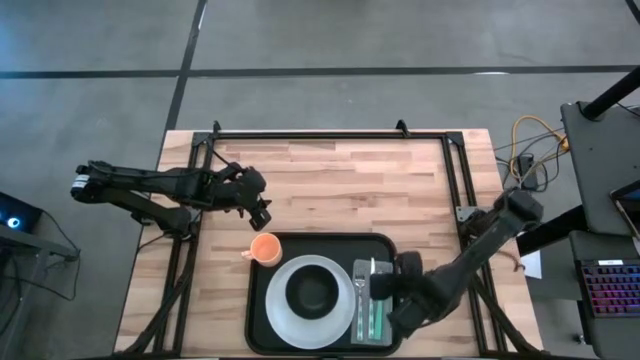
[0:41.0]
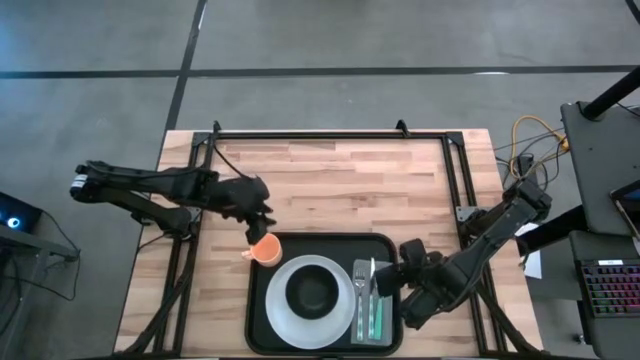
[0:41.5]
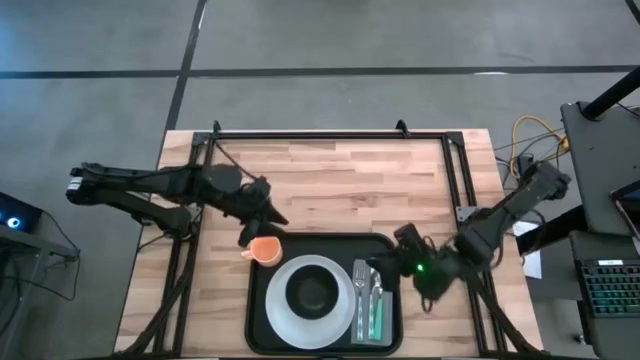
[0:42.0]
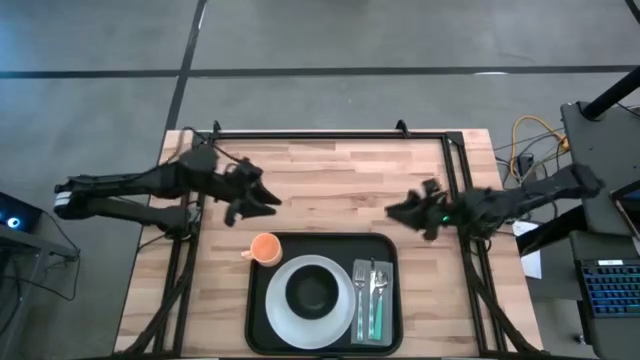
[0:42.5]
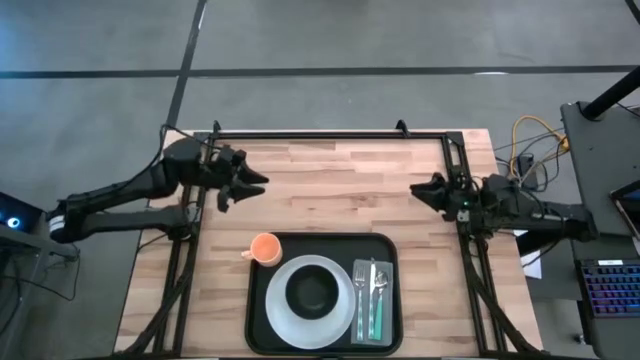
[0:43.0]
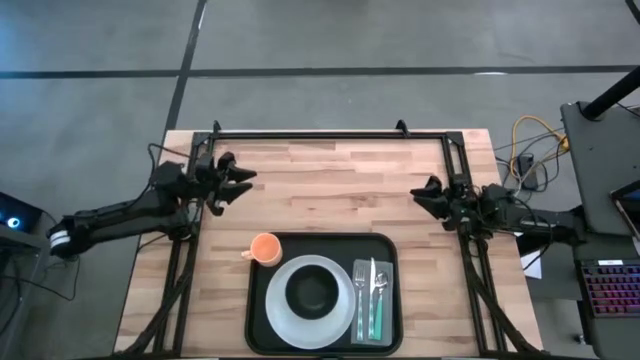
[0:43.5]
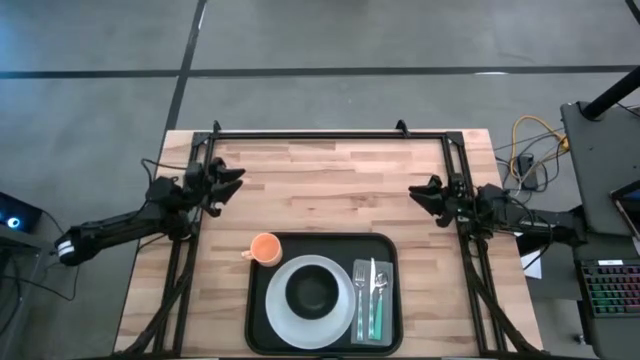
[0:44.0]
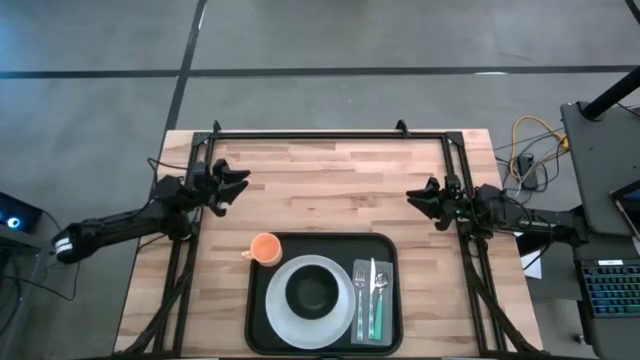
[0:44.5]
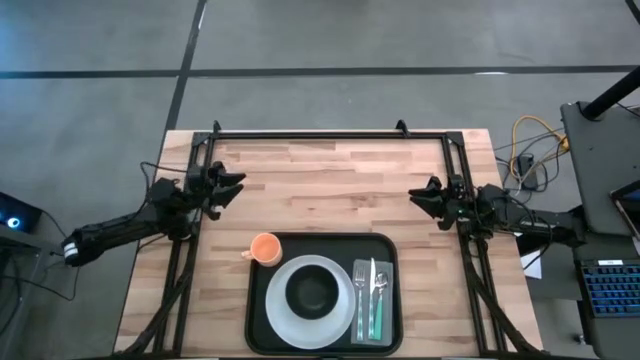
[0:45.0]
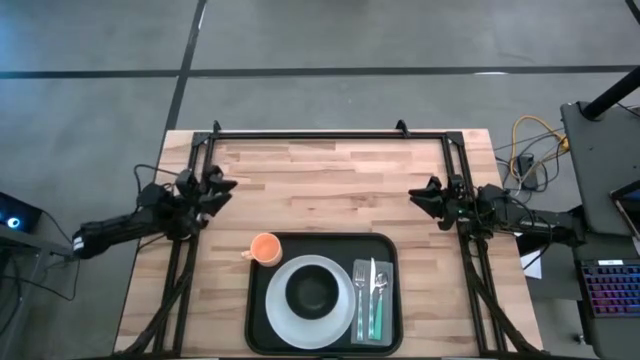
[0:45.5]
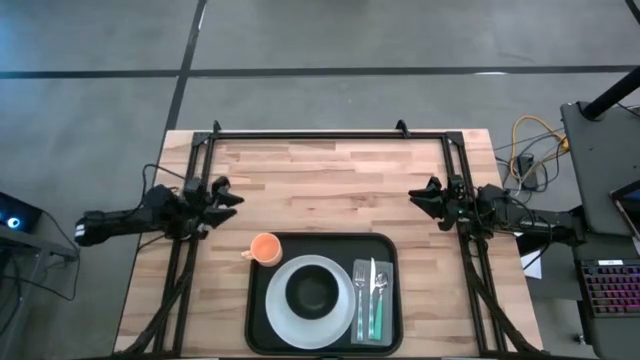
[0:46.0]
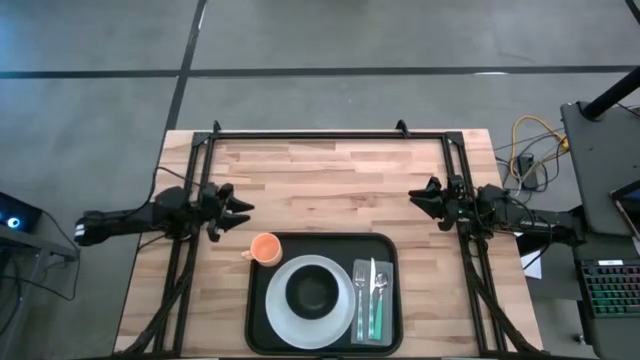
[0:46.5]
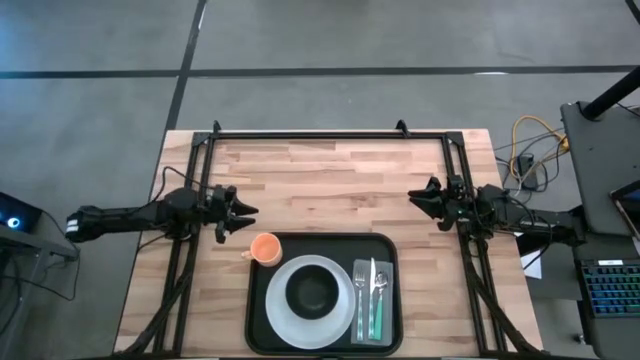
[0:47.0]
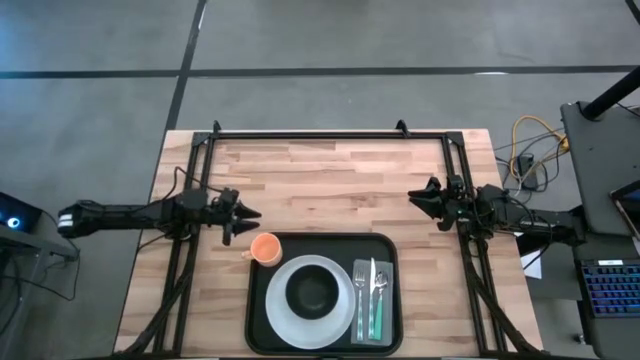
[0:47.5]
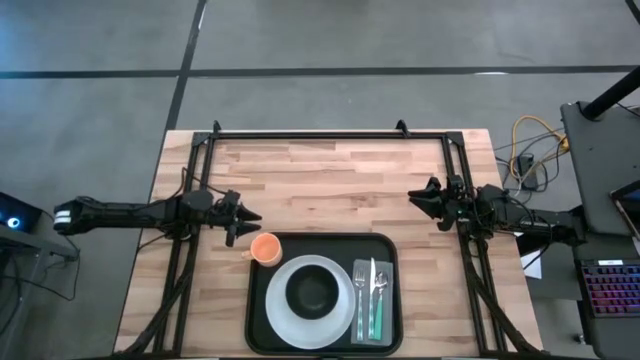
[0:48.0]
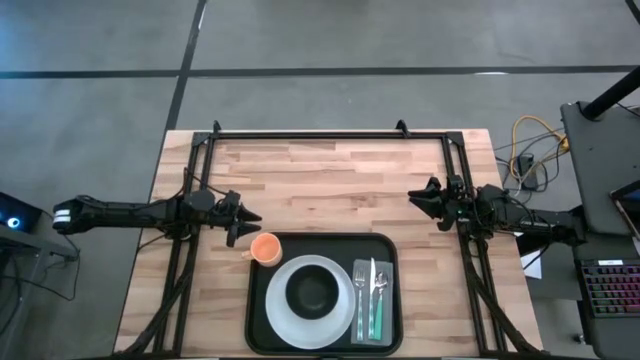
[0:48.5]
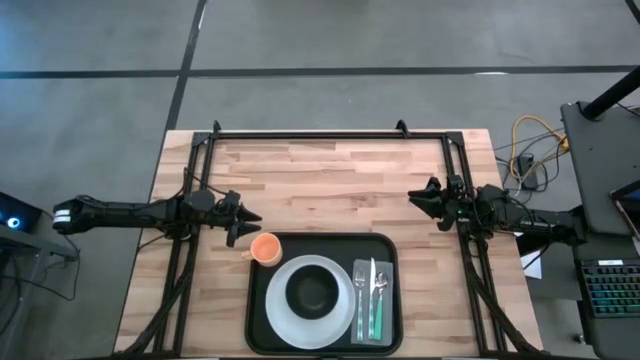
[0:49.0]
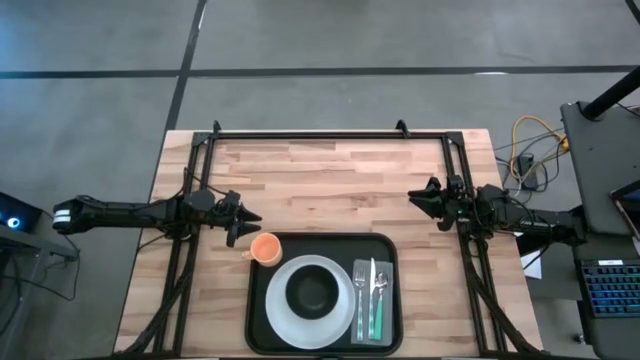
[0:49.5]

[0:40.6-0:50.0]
Task: Set up tray
Return to Home Position

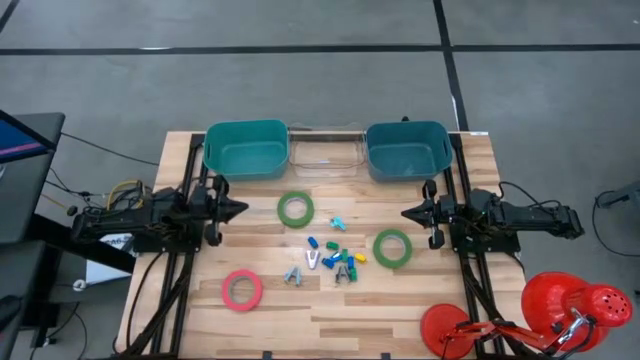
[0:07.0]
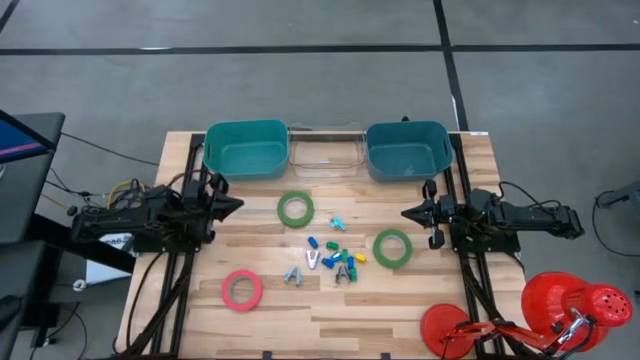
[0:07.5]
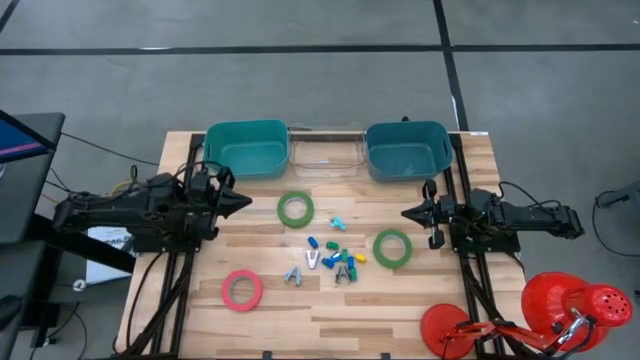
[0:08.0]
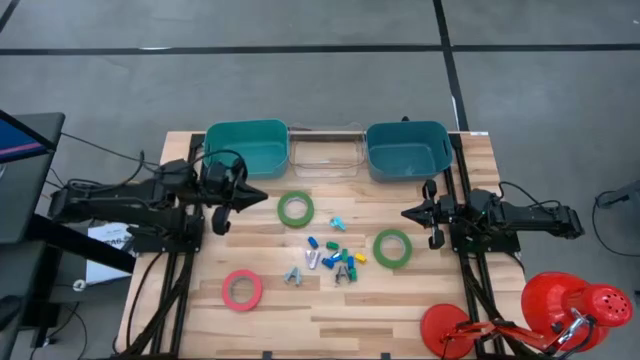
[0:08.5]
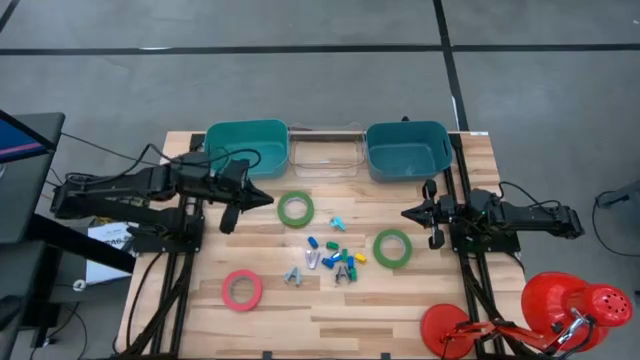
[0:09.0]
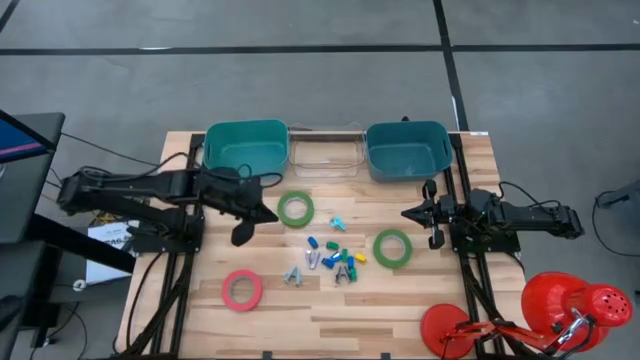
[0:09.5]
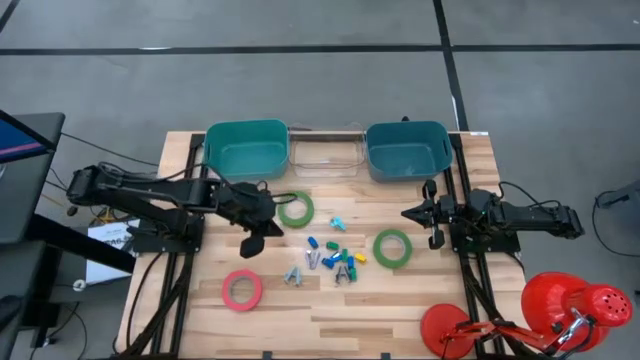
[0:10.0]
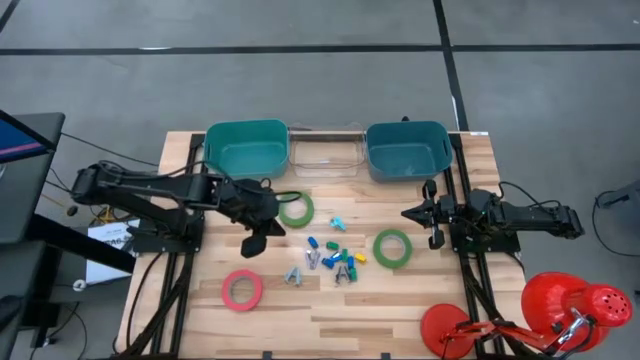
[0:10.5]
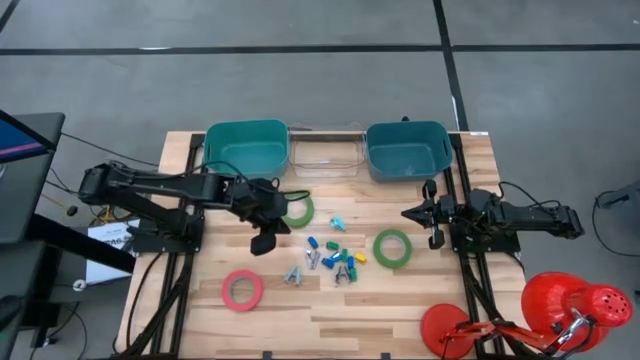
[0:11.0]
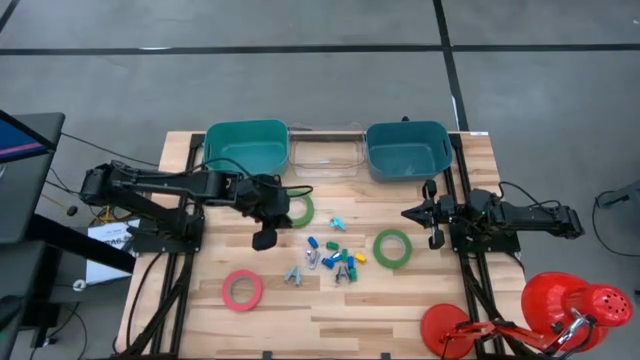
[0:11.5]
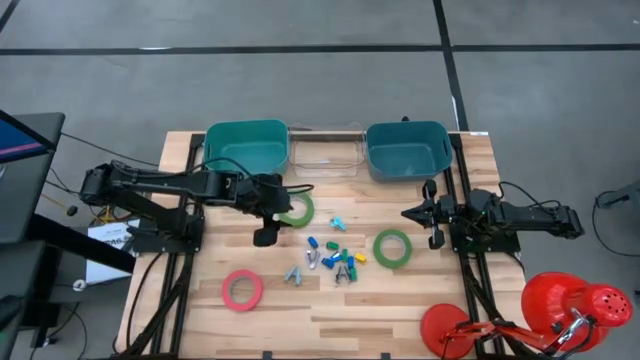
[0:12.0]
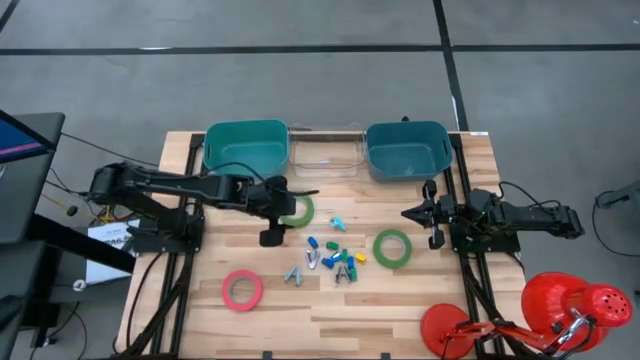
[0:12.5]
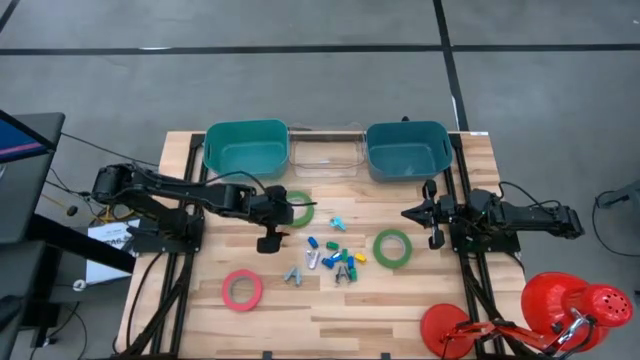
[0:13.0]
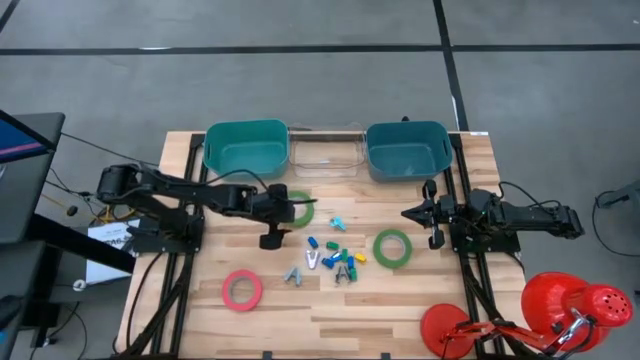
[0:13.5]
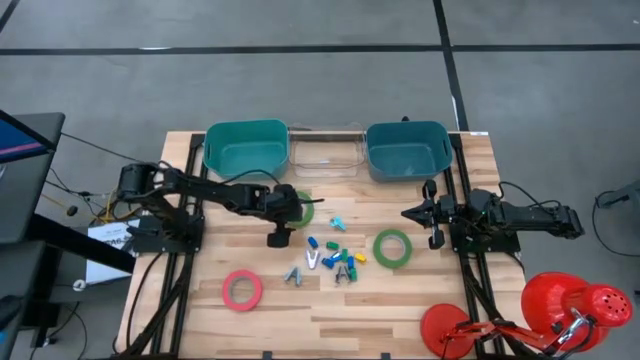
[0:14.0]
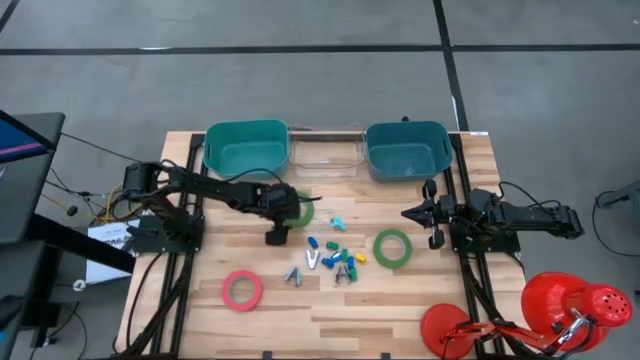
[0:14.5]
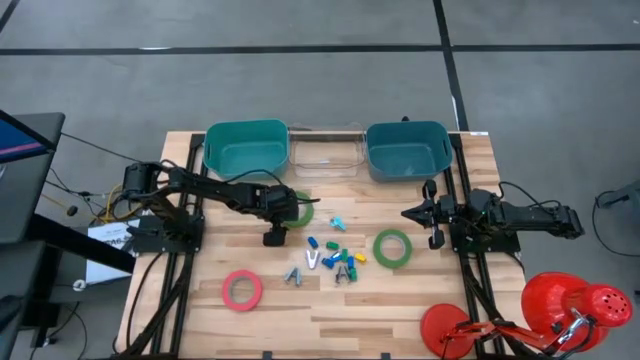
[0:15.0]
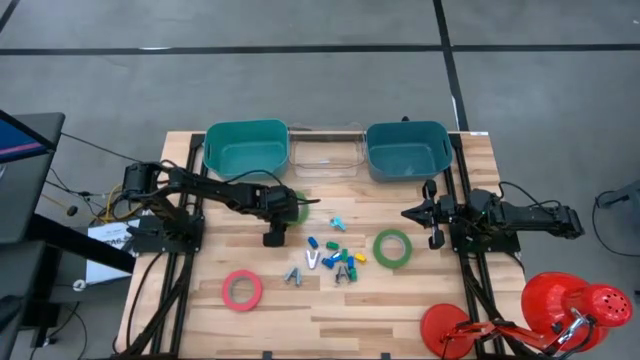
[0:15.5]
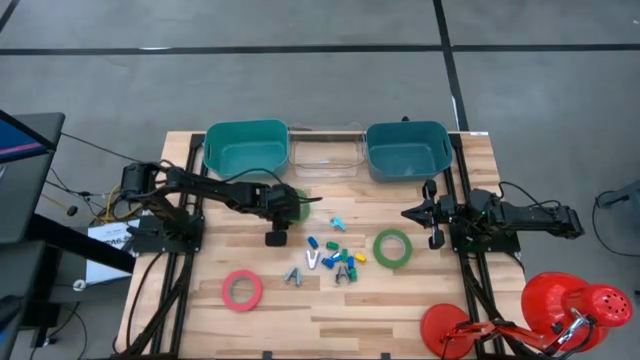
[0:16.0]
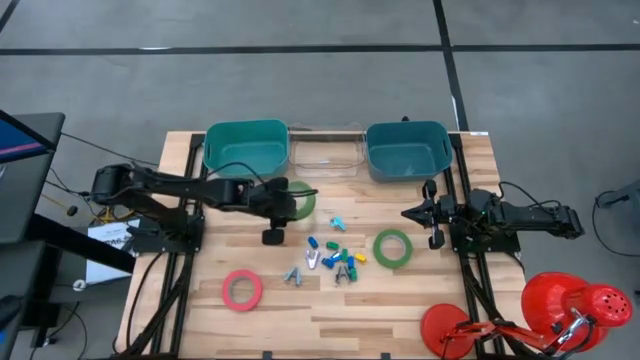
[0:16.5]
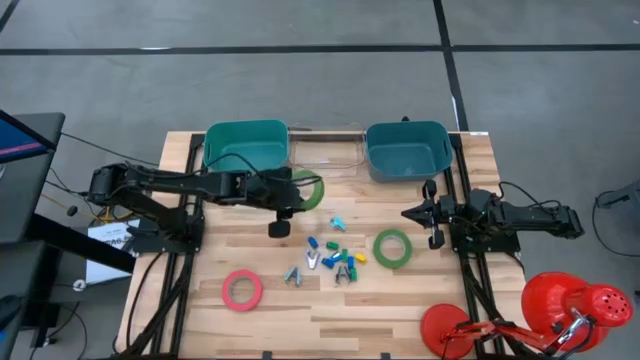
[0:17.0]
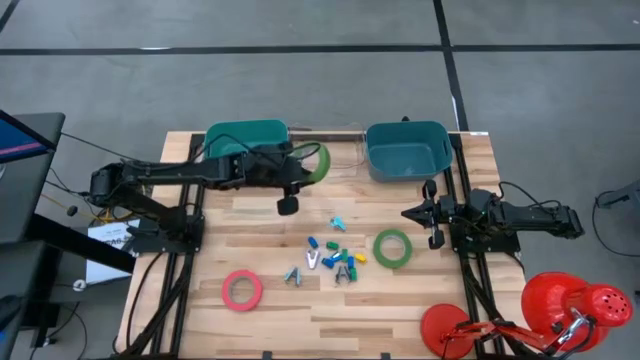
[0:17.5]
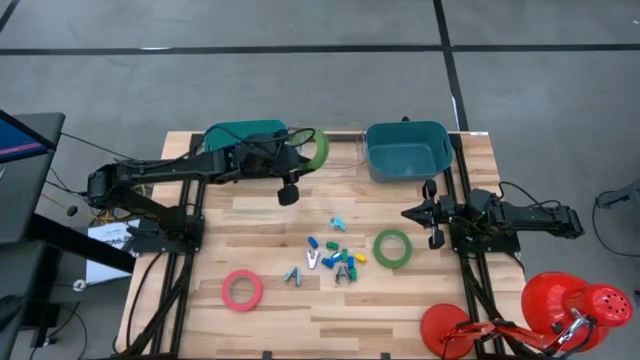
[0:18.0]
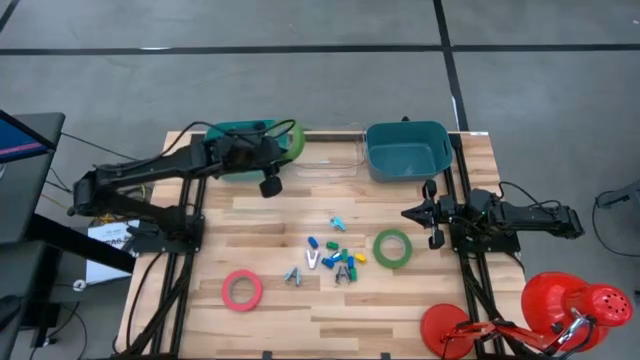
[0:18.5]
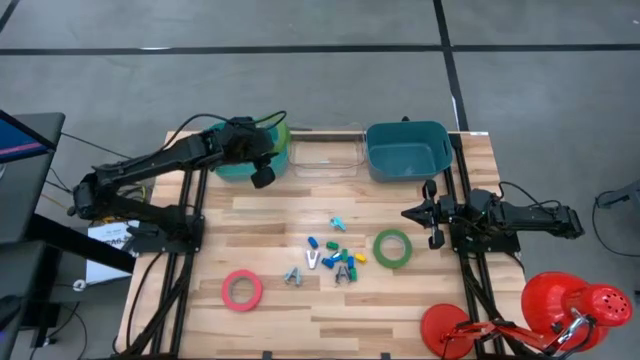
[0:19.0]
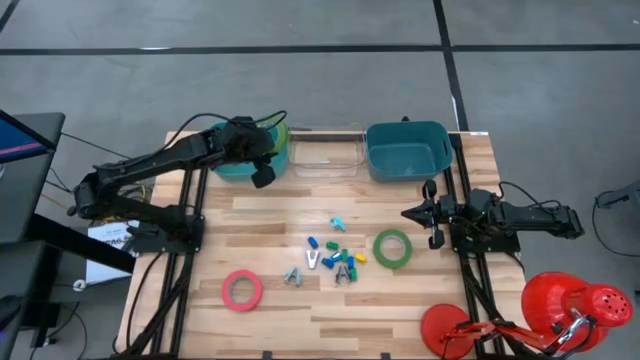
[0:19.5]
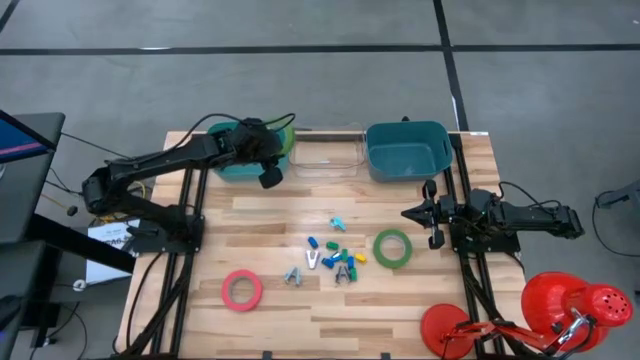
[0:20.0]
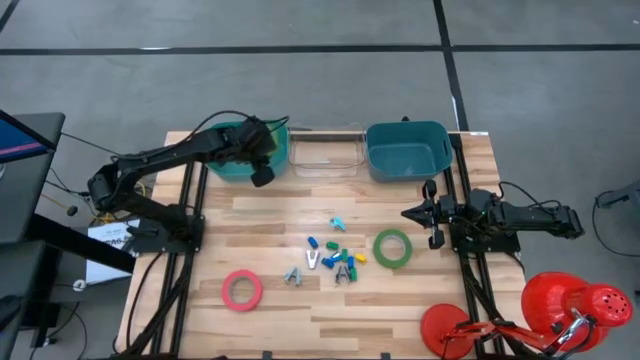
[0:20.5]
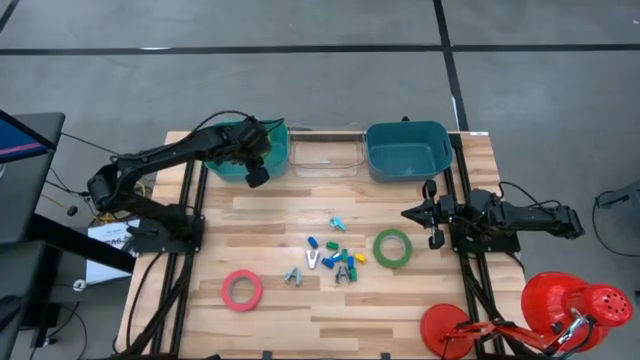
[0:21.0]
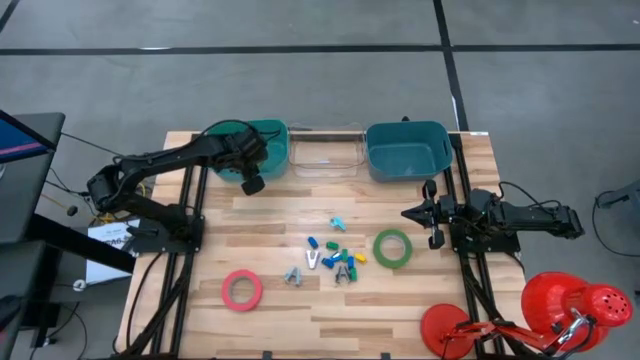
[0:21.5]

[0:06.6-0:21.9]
Task: Pick and place Stapler, Stapler remover, tape
Put the green tape into the green bin
